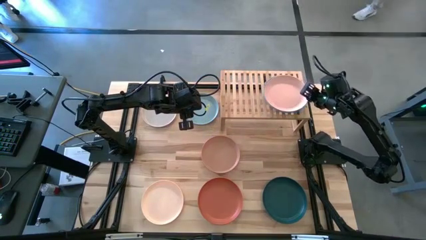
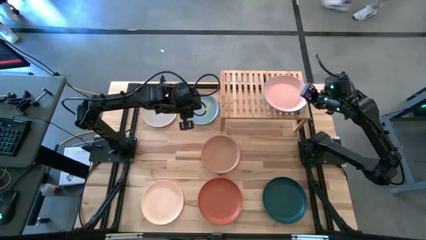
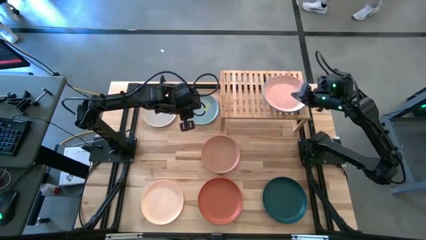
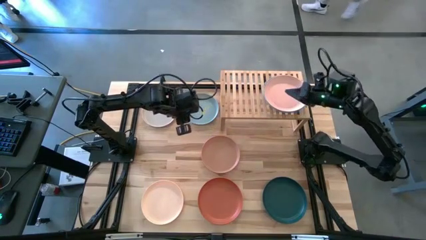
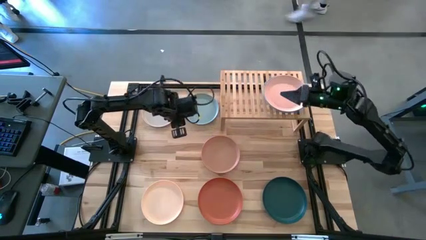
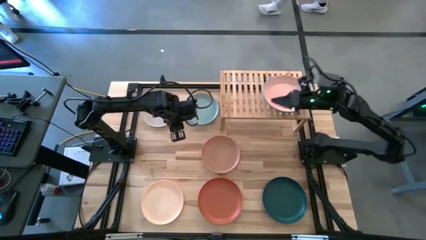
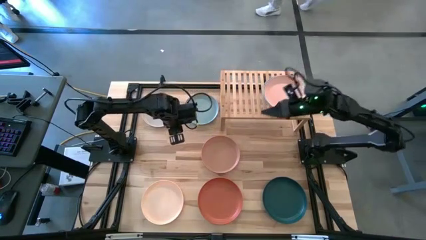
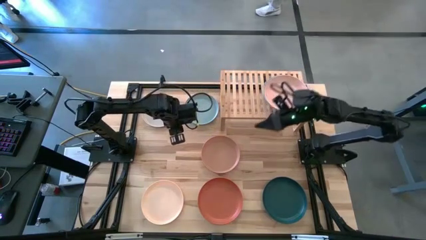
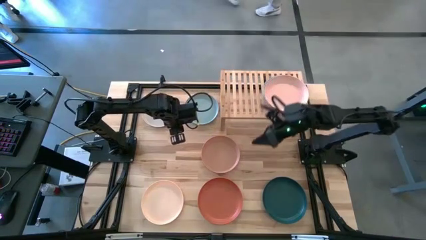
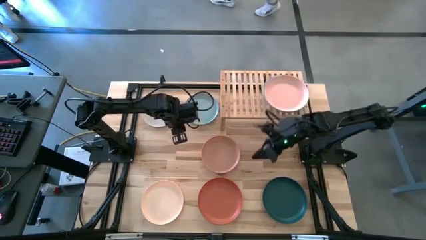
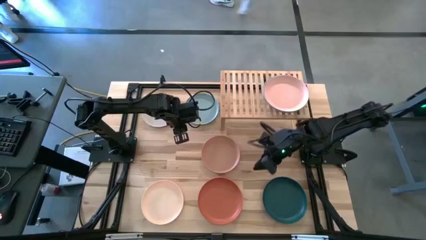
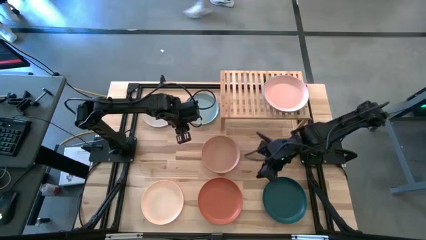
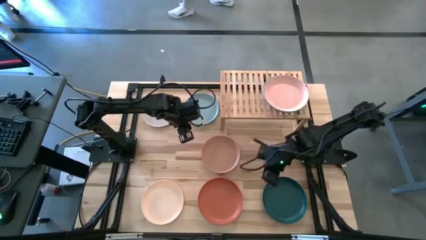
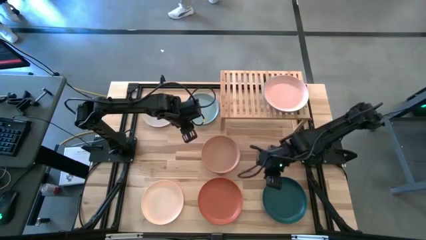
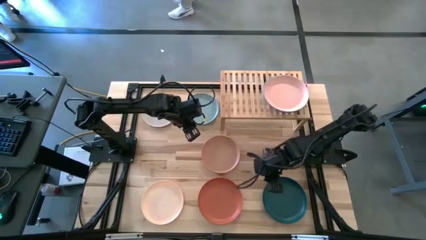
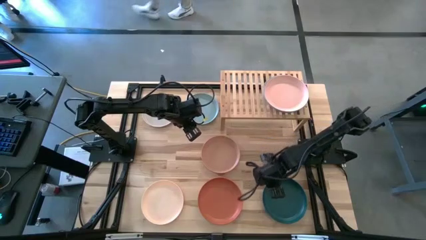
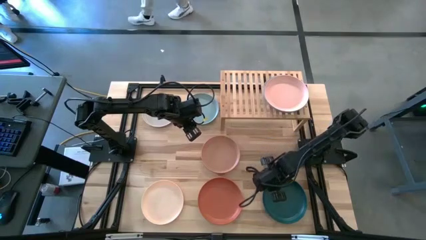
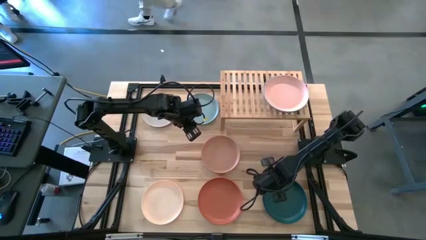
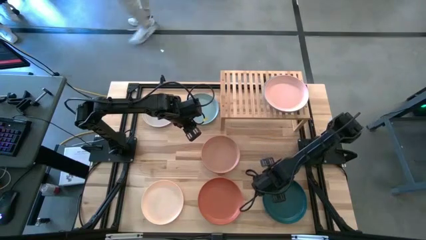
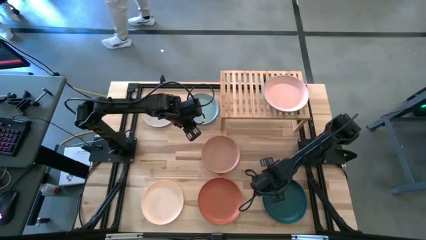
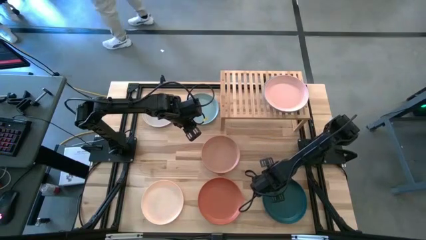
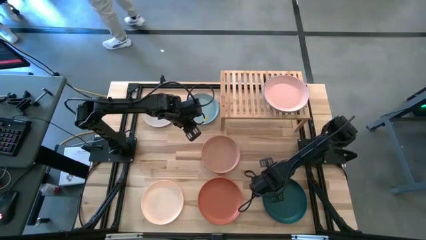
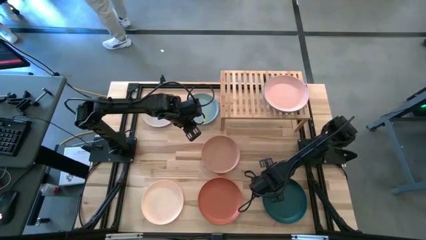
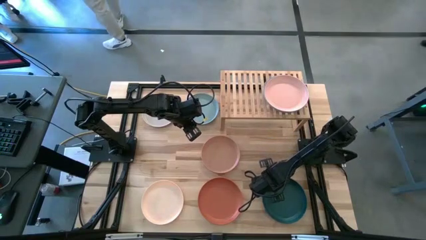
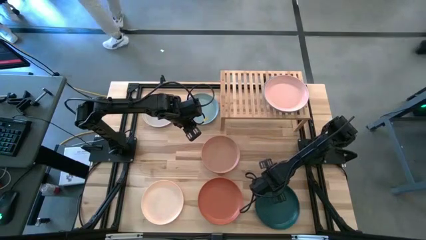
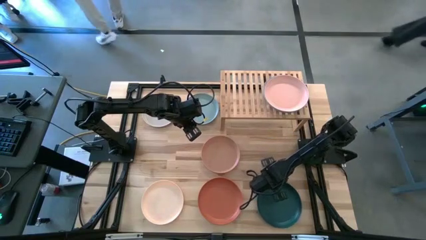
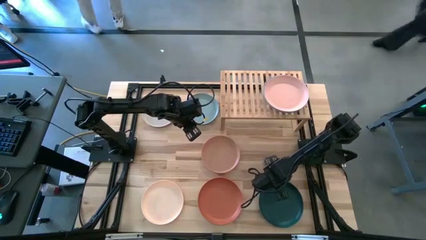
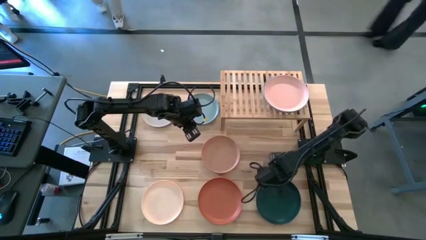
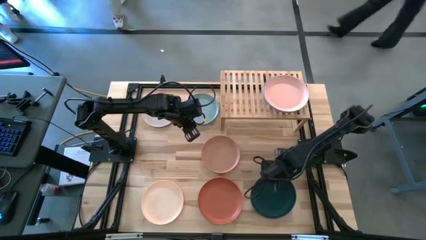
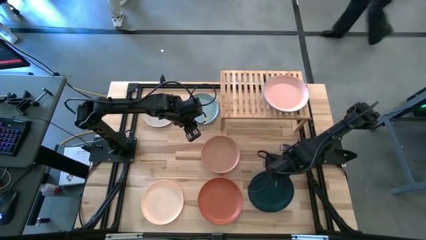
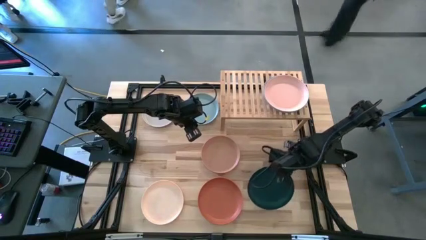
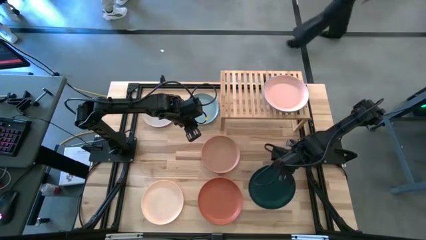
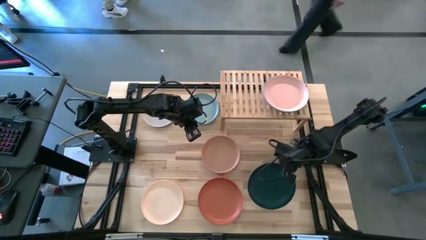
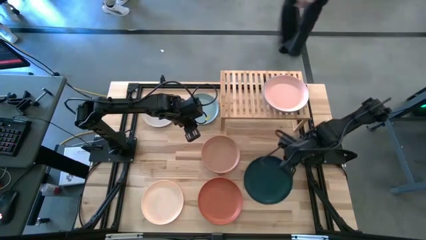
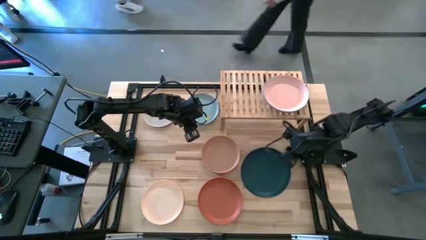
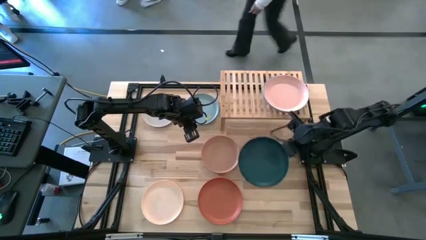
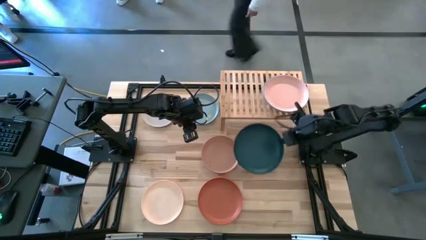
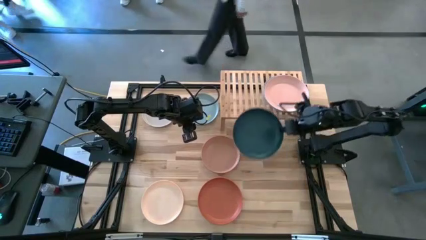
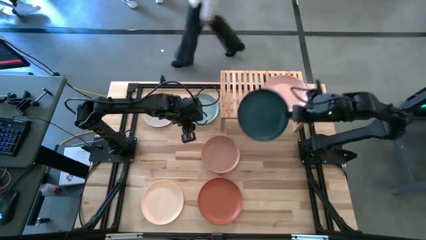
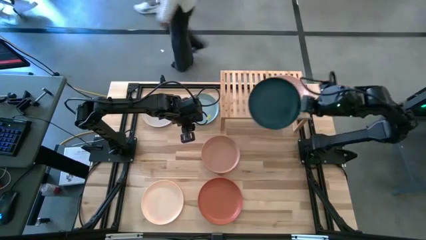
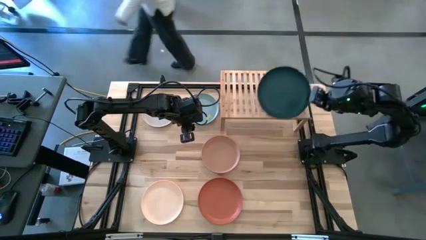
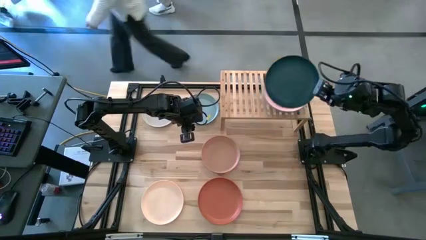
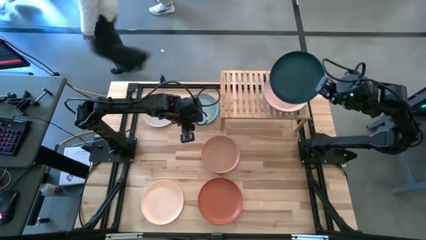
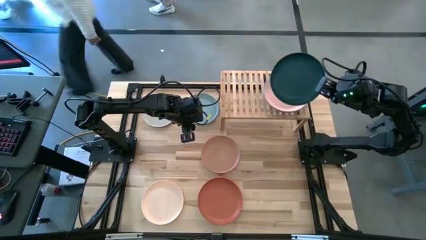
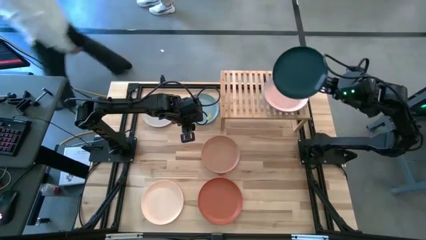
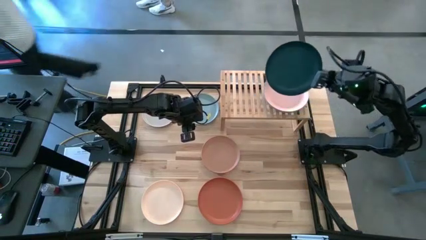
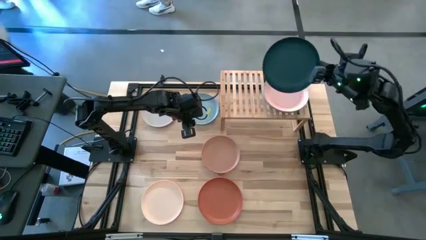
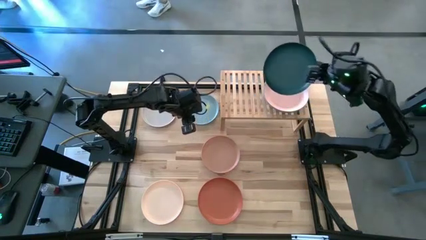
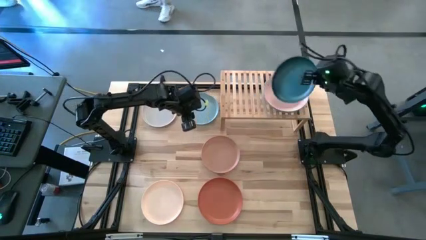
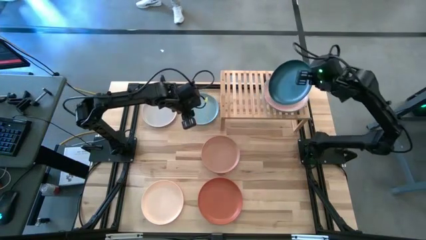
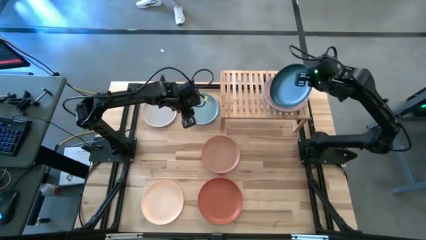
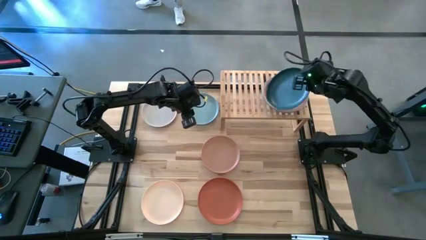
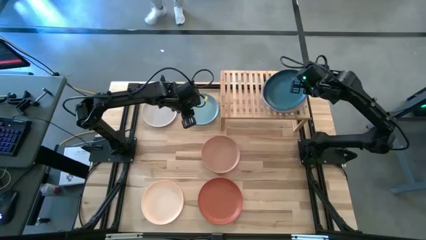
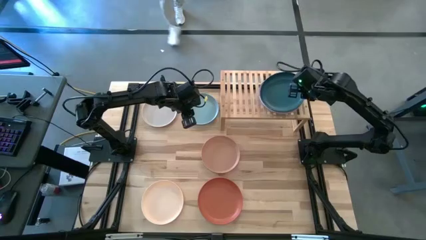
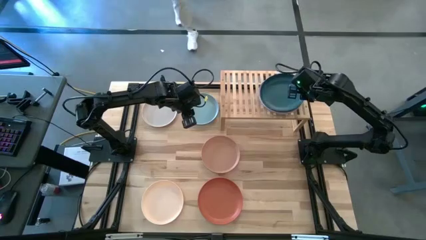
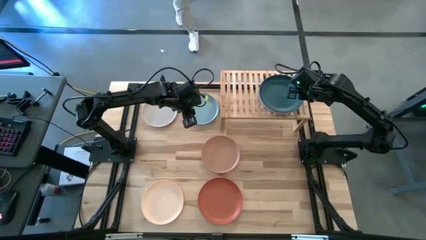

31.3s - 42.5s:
Task: Place and stack plates onto a shelf
Stack the green plate on top of the pink plate on the shelf

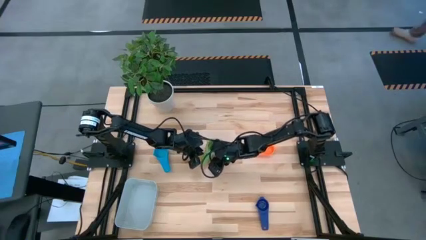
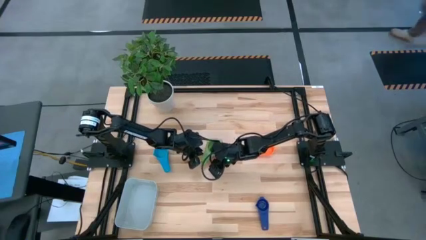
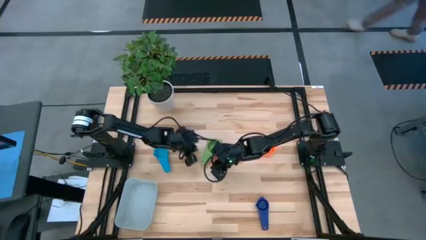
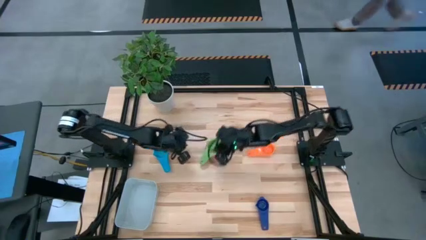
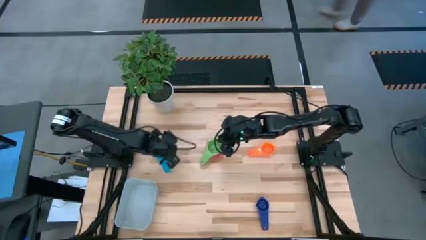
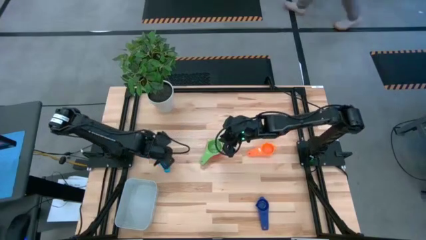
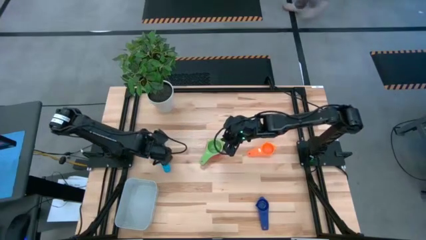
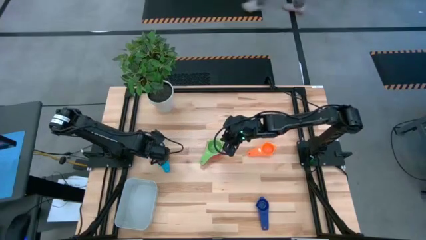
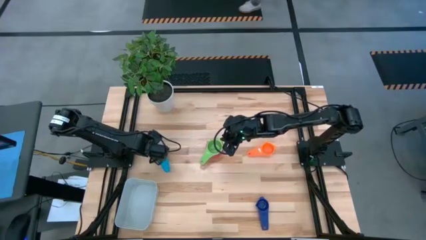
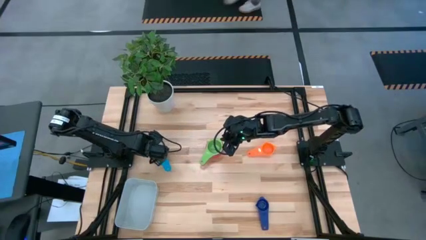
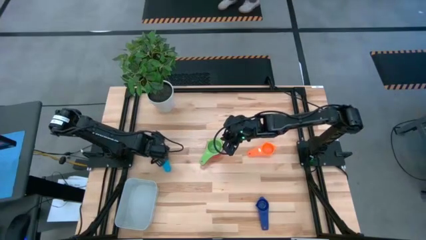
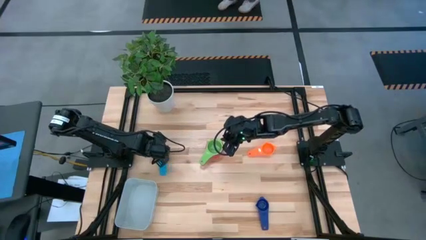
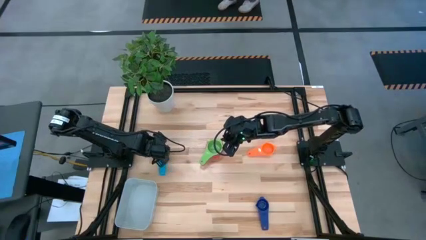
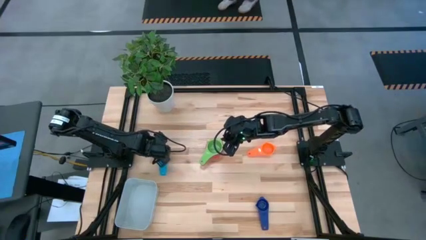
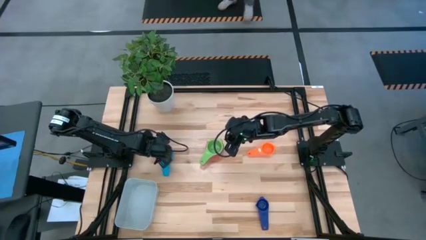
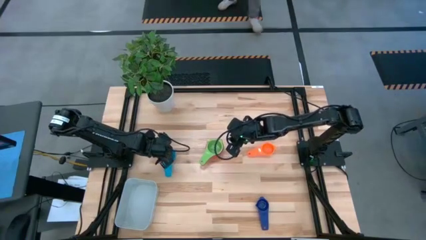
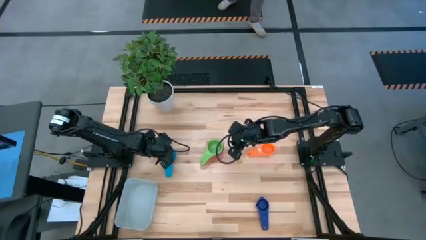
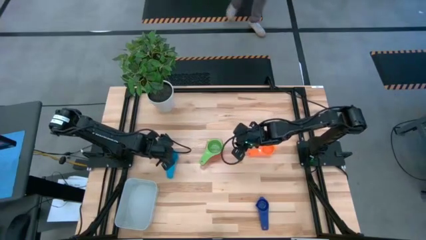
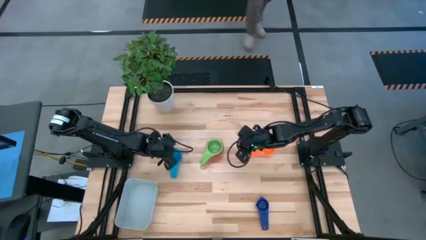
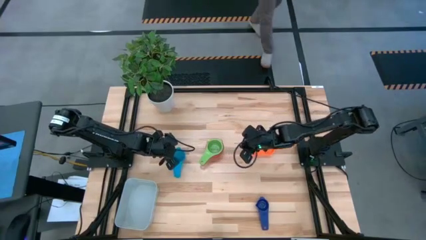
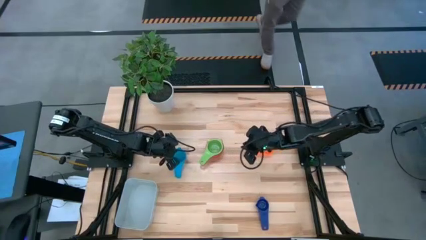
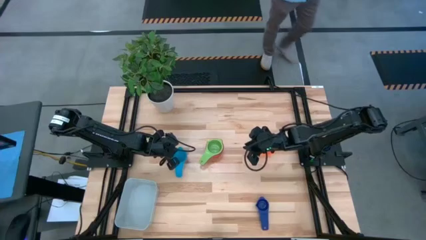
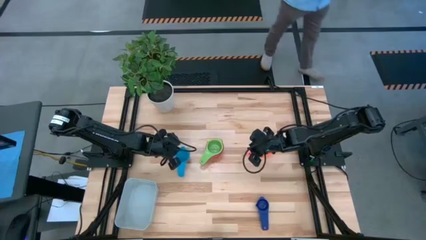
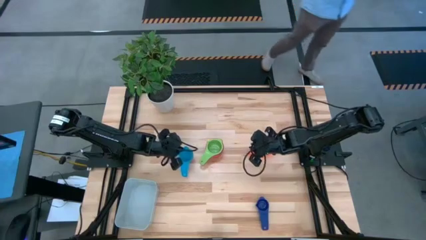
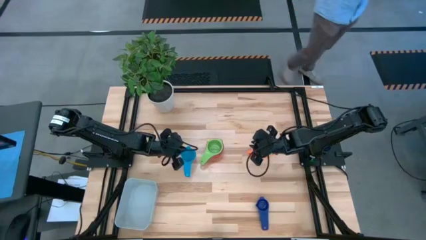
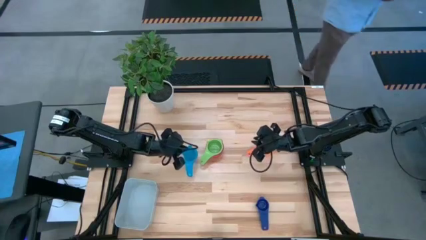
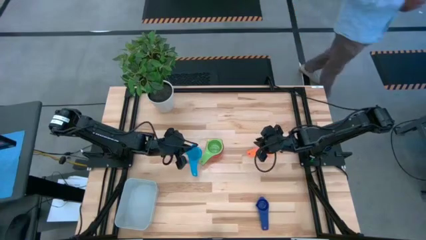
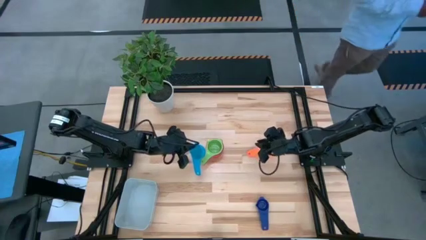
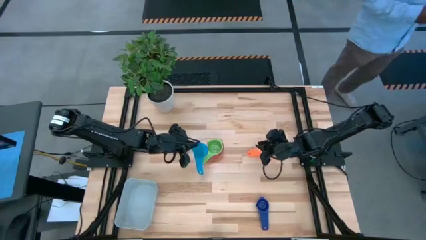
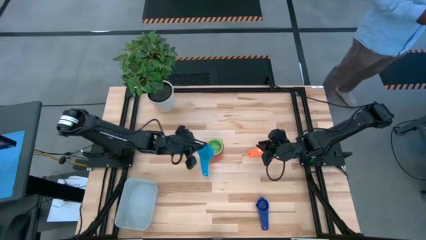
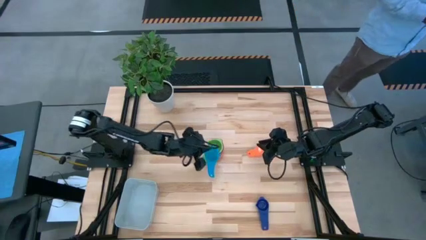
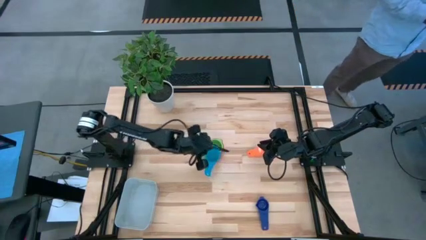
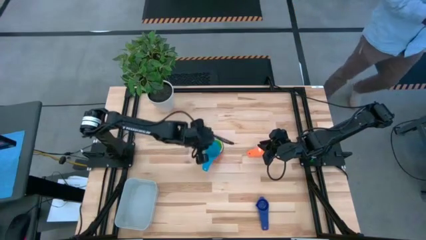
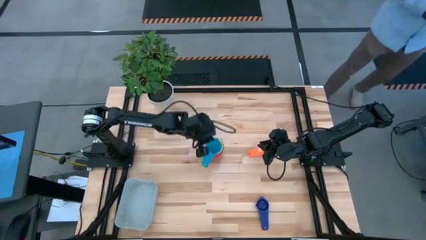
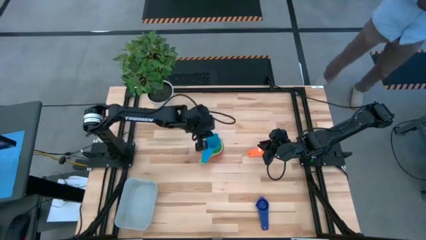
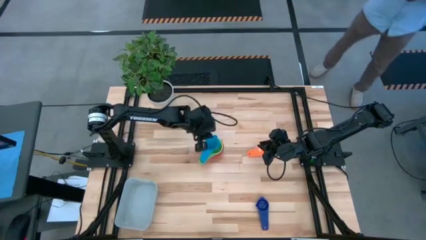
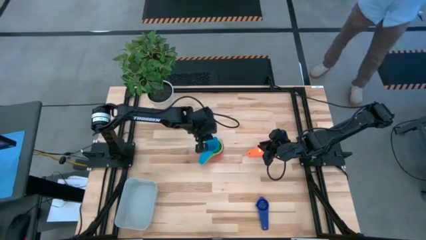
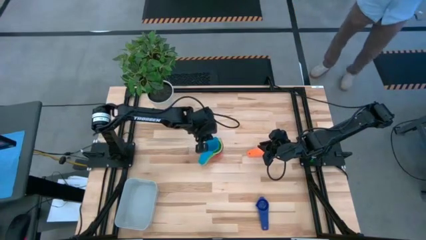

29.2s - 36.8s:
Task: Nest measuring cups in basket
Stack the light blue measuring cup on the green measuring cup
